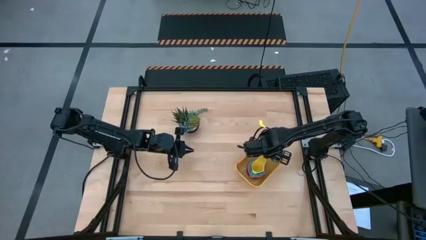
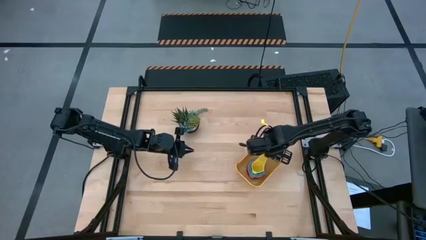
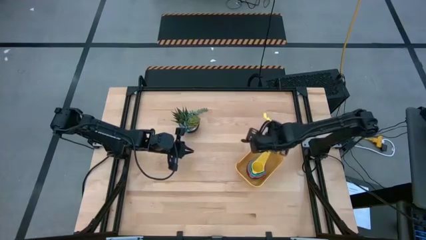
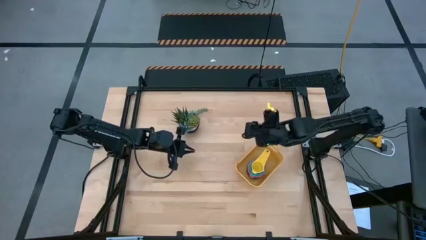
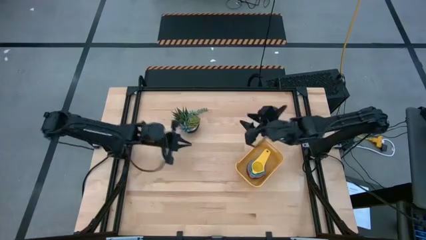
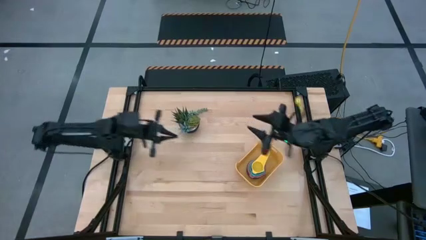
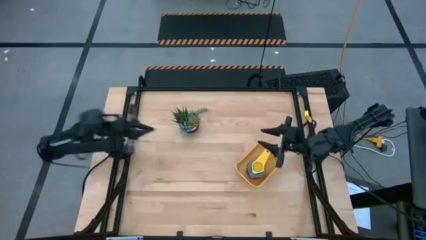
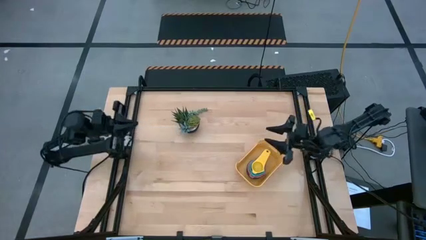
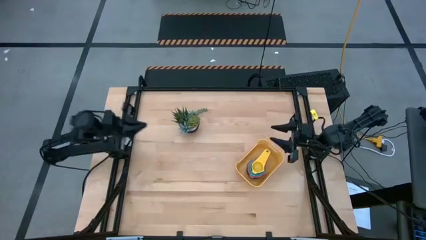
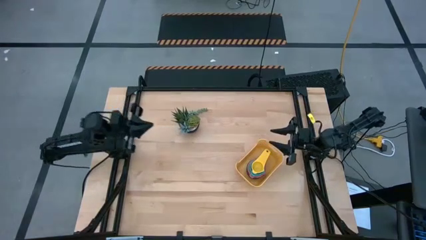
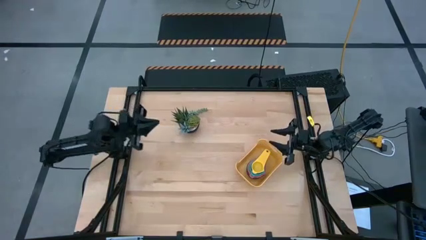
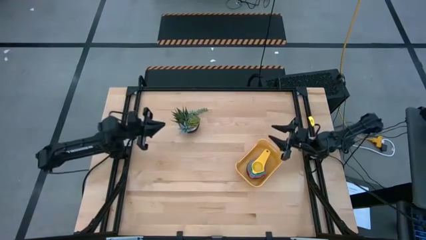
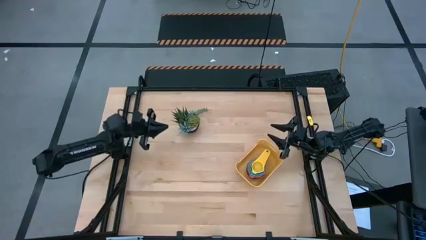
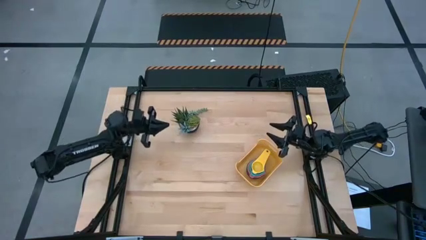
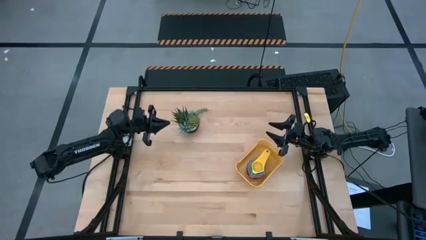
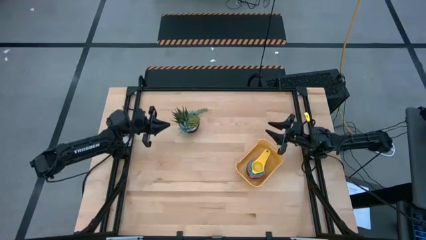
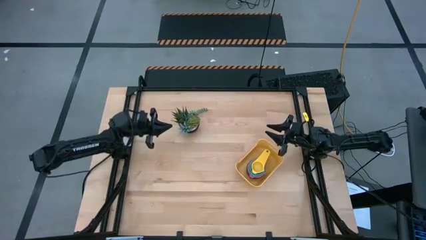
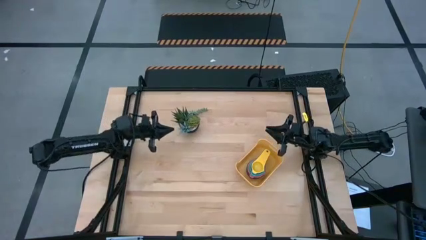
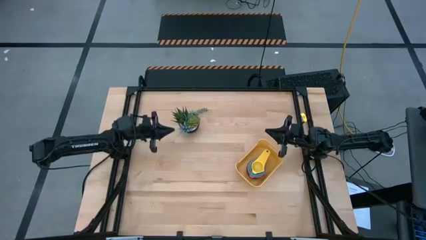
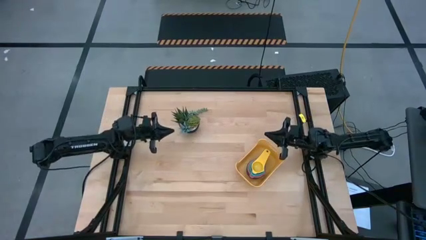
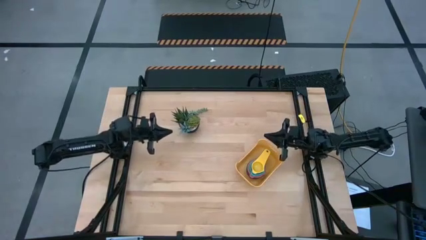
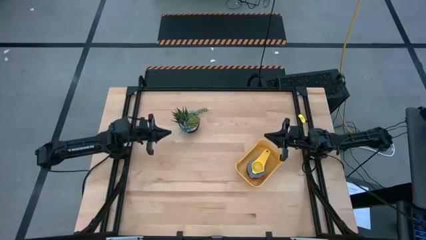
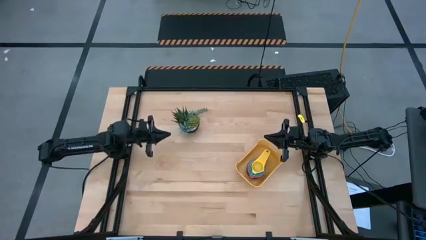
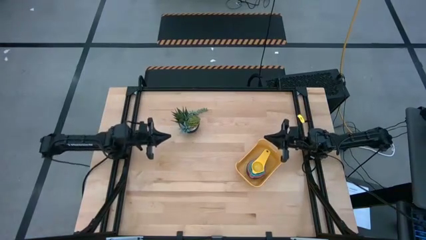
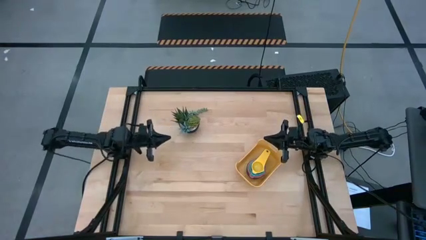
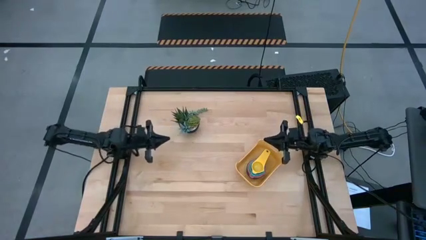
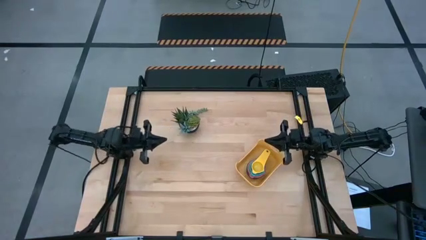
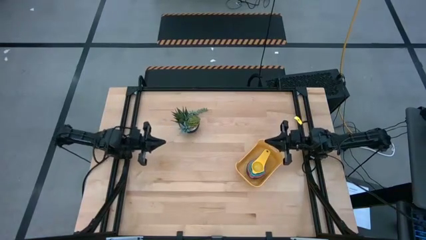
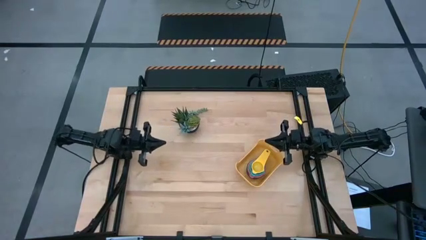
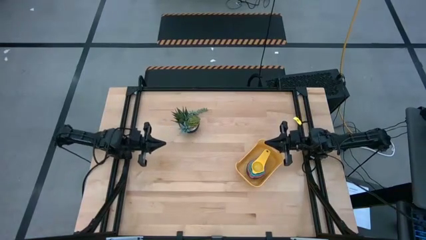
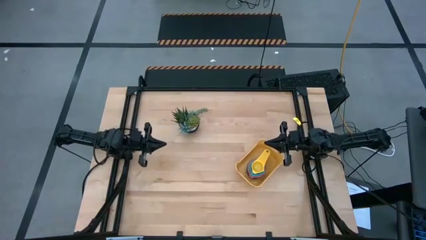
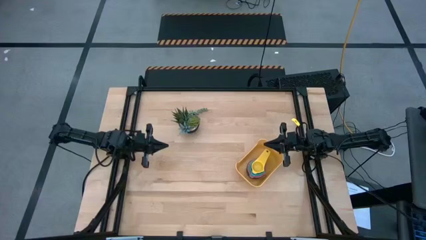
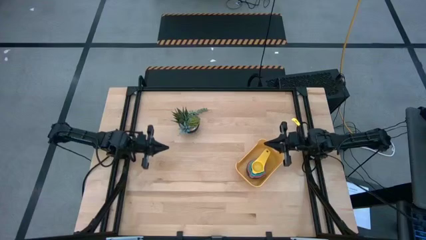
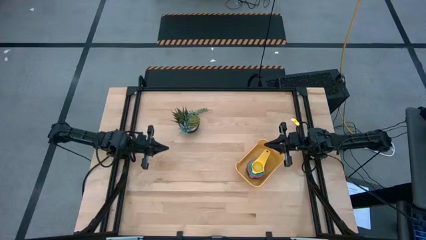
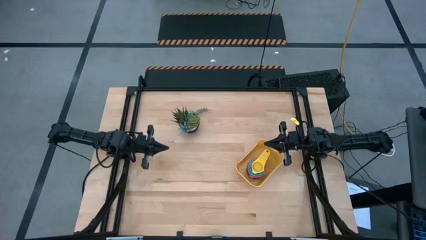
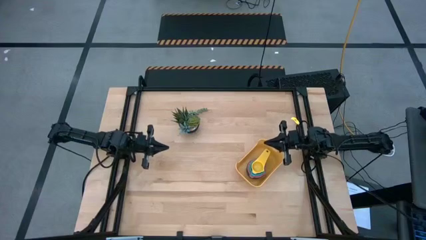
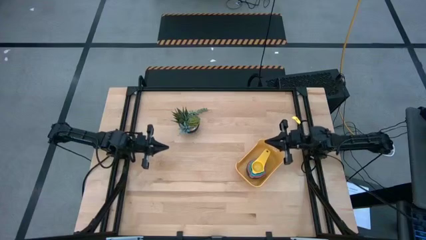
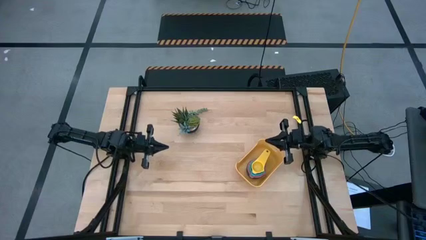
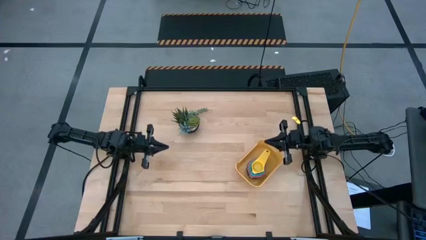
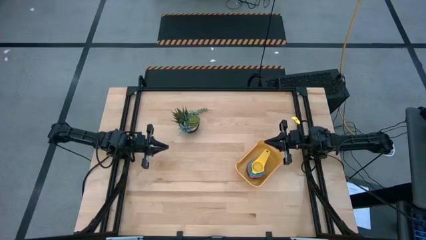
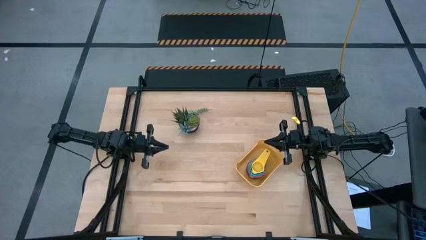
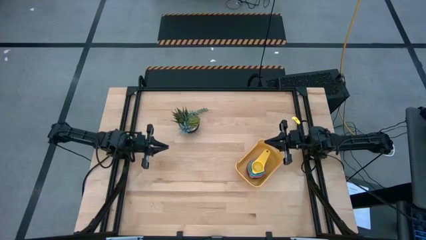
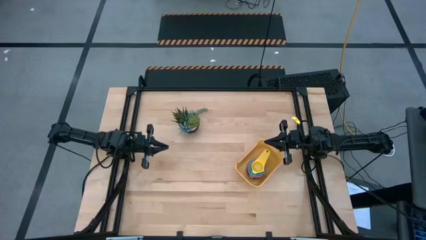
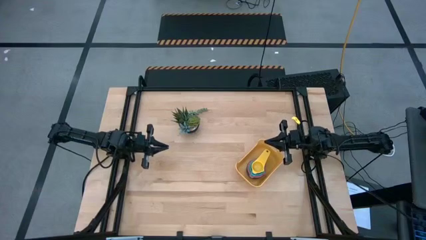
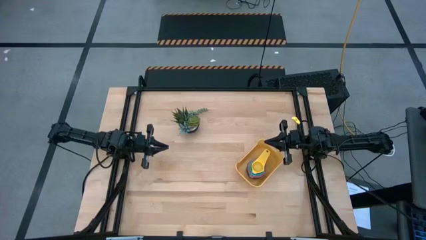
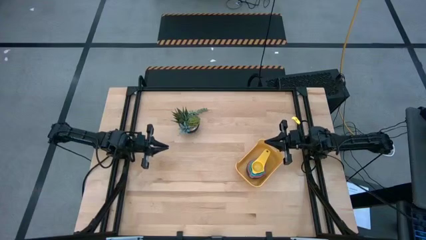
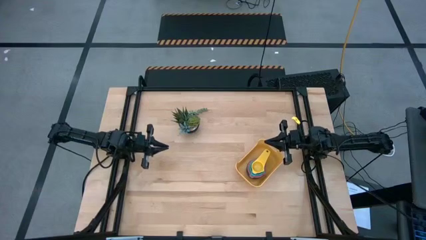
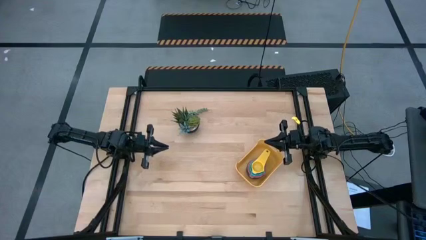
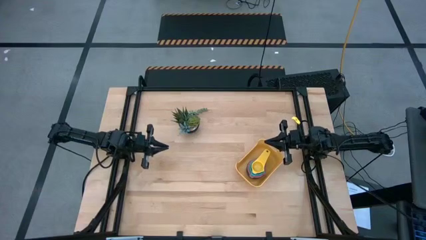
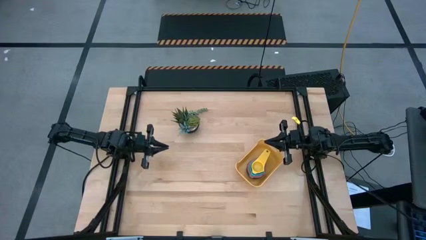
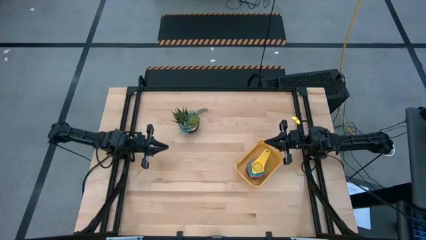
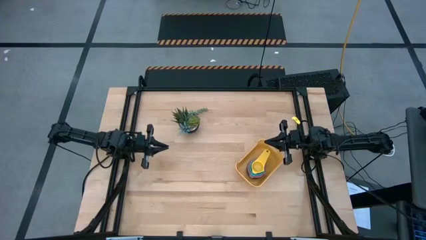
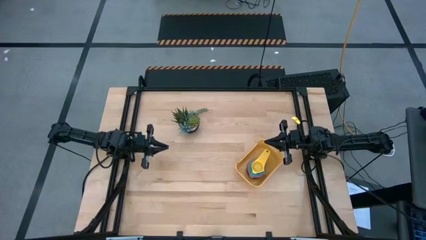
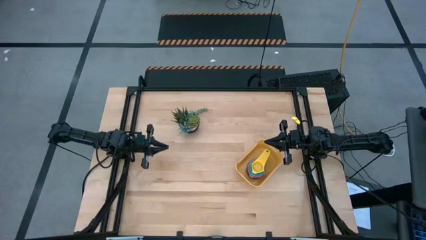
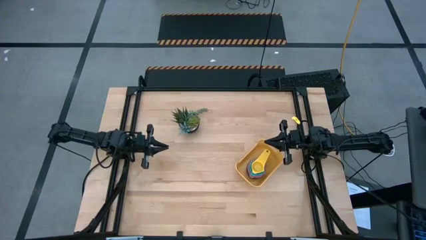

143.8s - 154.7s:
Task: Nest measuring cups in basket
Return to Home Position

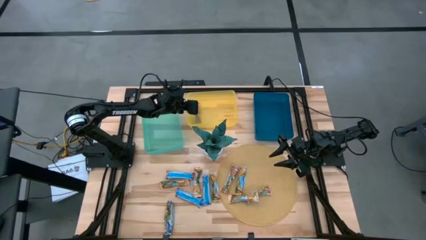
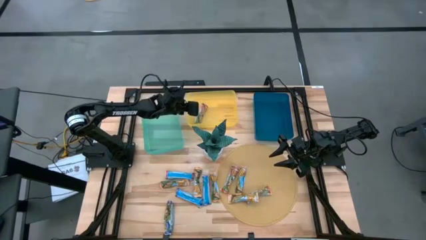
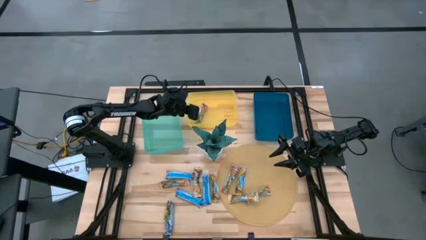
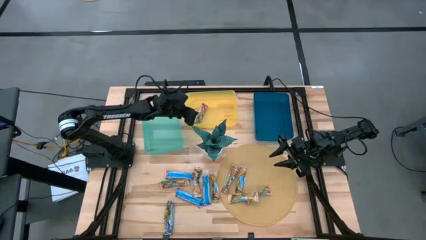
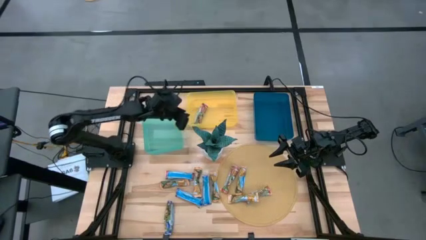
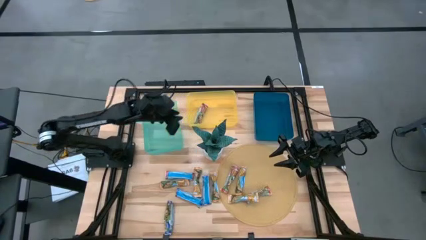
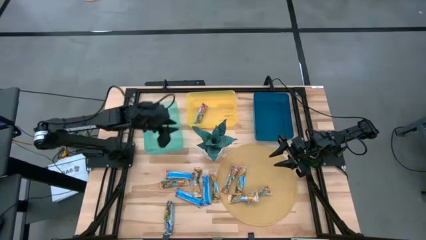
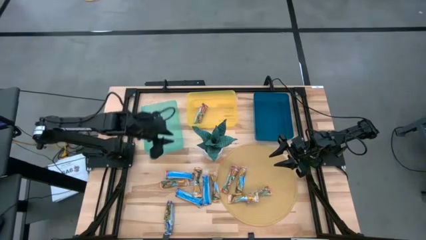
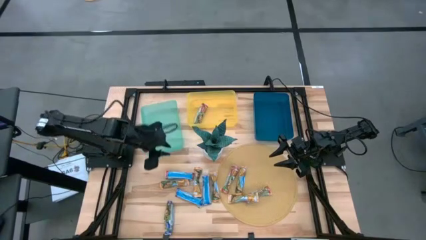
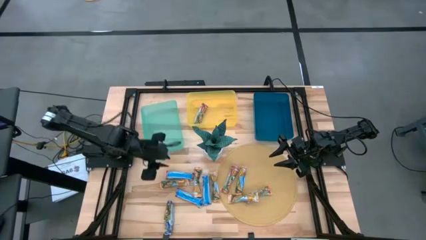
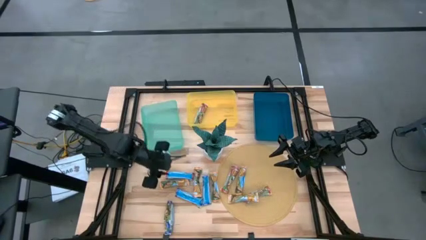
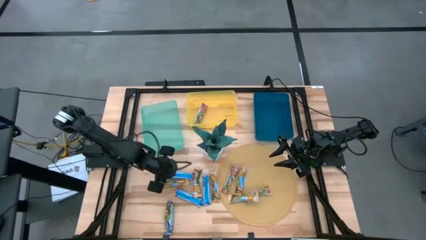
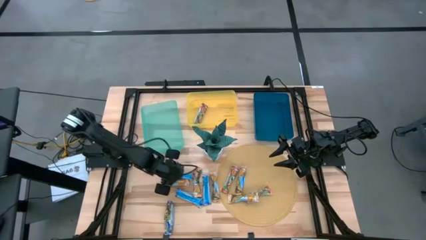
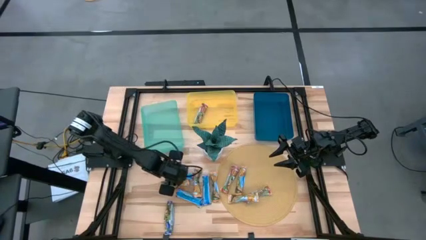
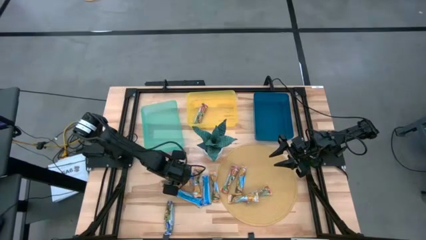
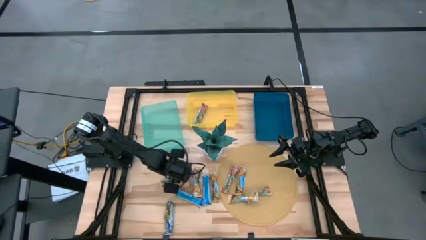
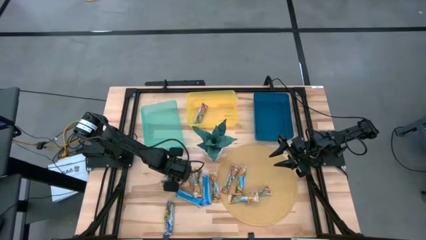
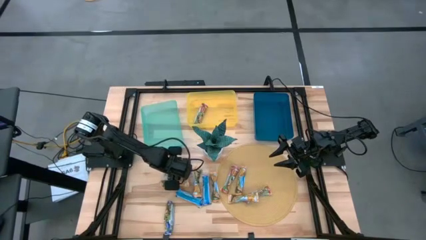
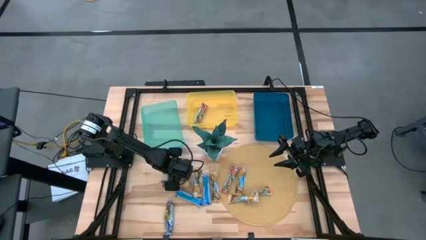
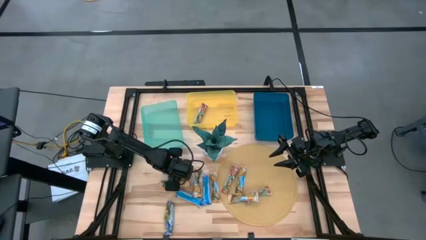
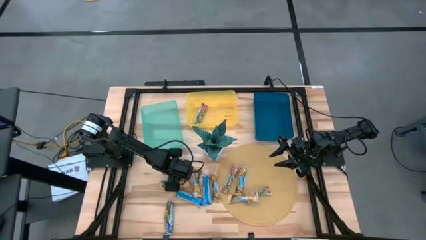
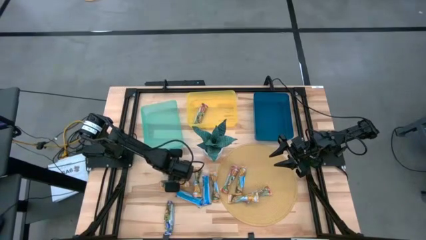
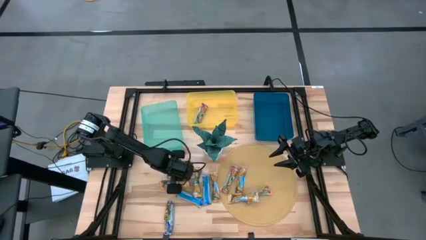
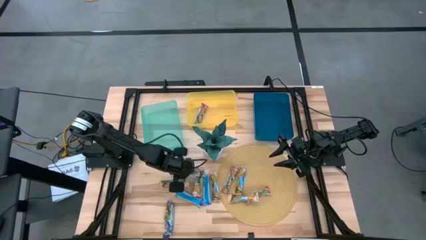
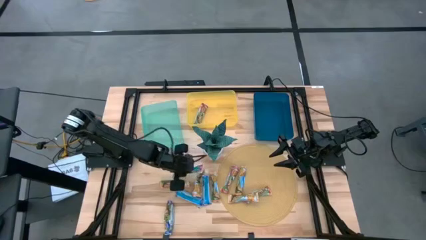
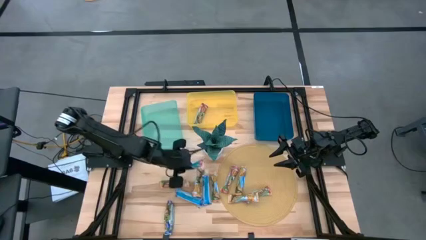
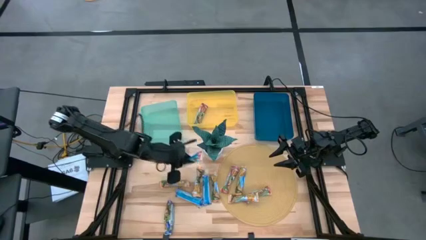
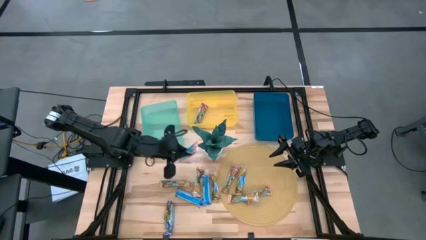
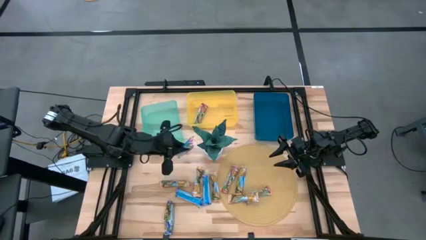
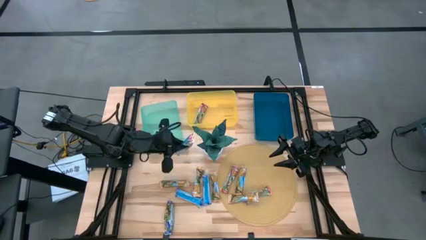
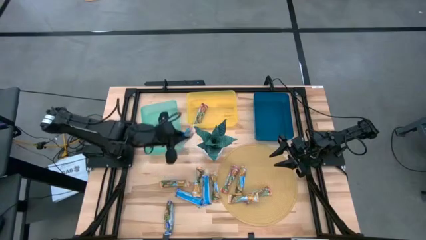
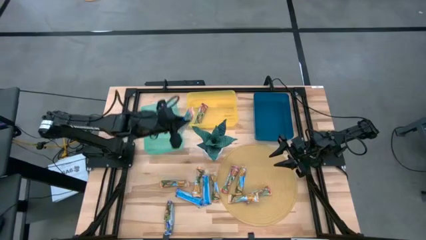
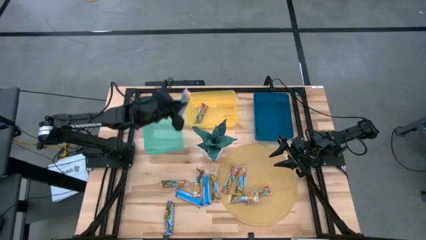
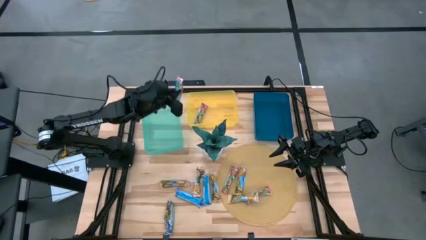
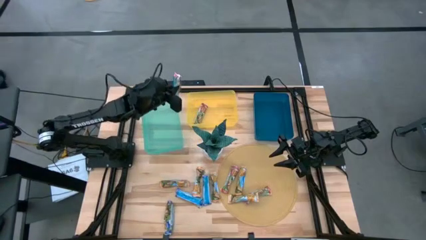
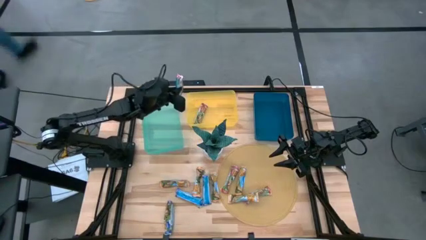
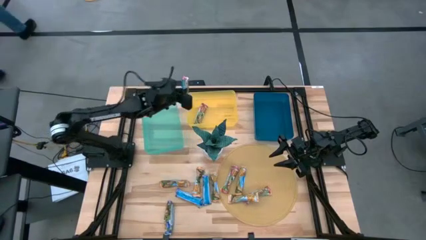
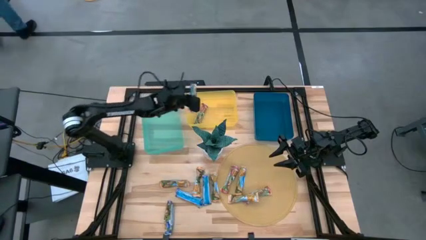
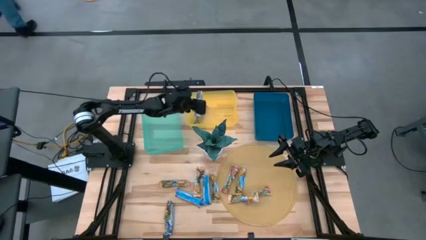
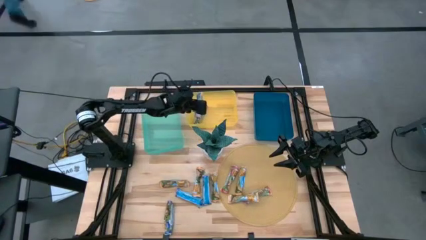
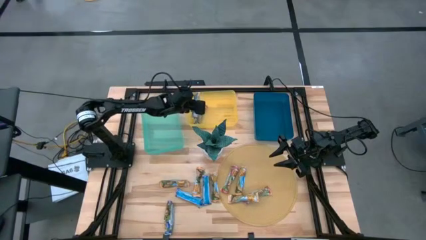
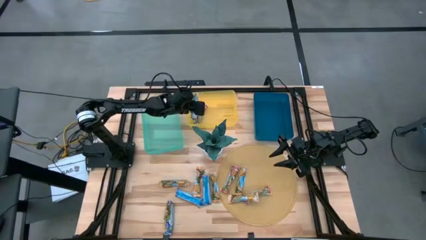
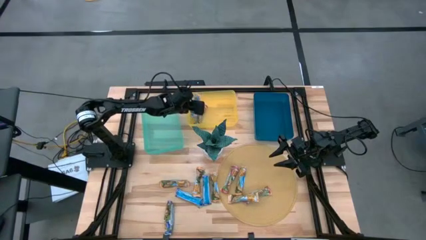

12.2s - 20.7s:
Task: Pick and place Granola Bars by type
Put the red granola bar into the yellow bin
